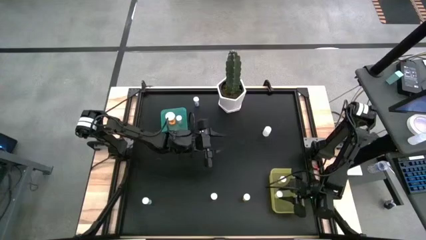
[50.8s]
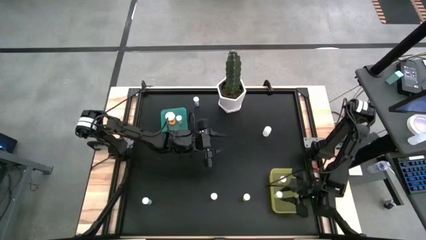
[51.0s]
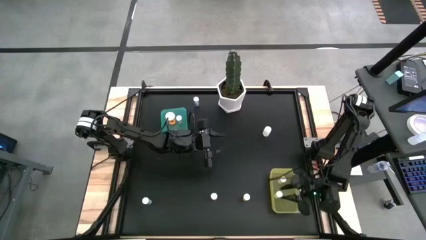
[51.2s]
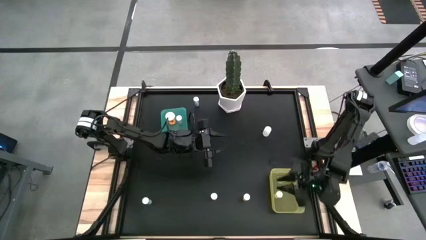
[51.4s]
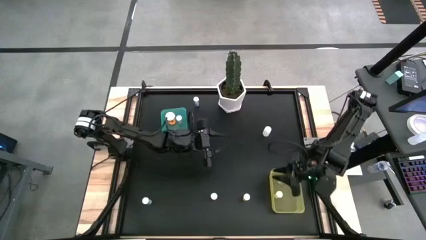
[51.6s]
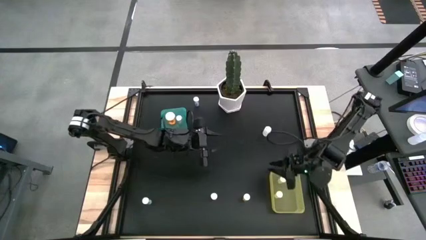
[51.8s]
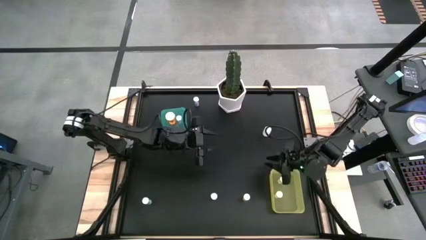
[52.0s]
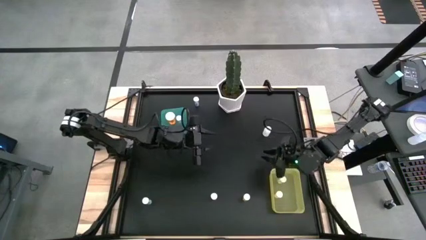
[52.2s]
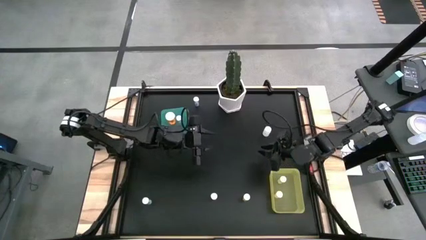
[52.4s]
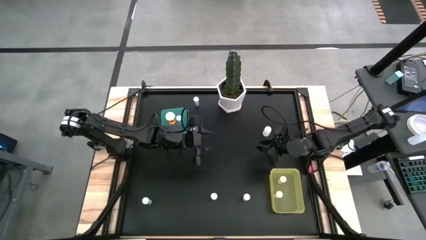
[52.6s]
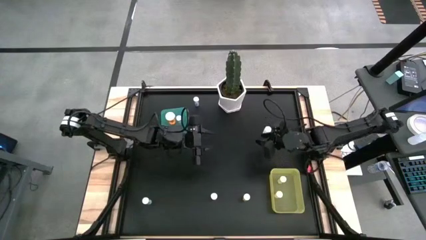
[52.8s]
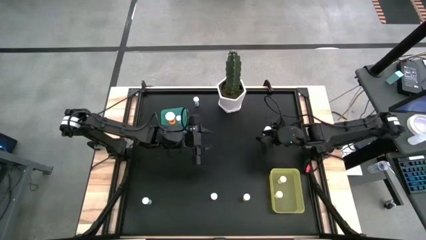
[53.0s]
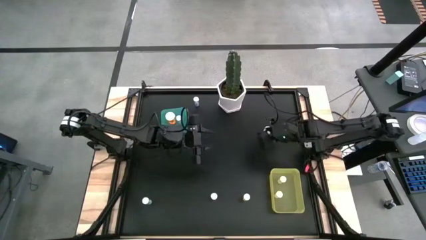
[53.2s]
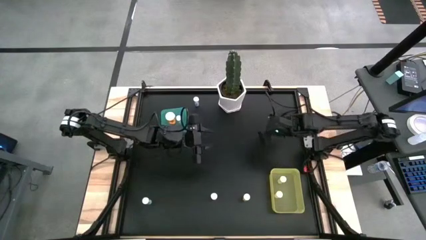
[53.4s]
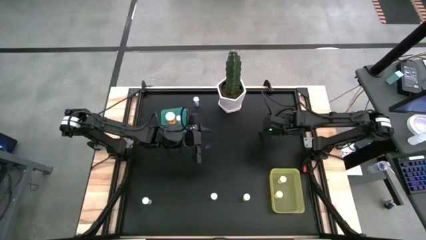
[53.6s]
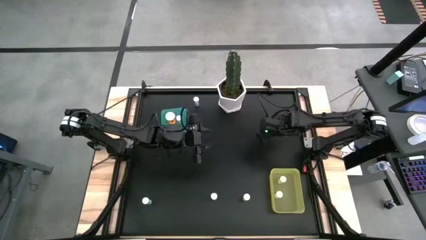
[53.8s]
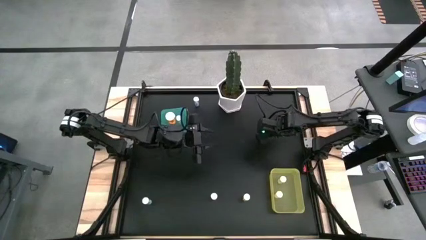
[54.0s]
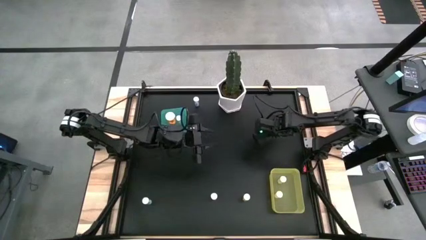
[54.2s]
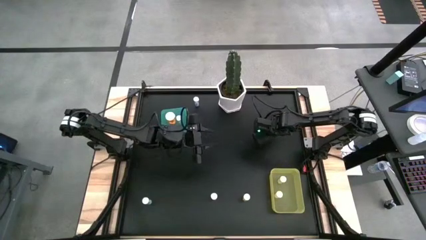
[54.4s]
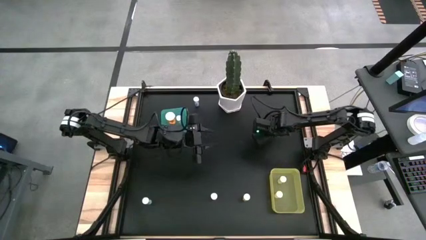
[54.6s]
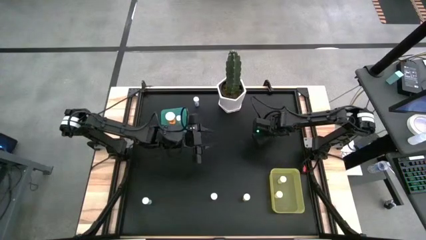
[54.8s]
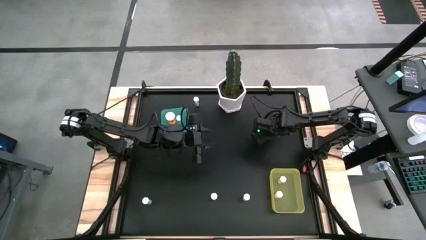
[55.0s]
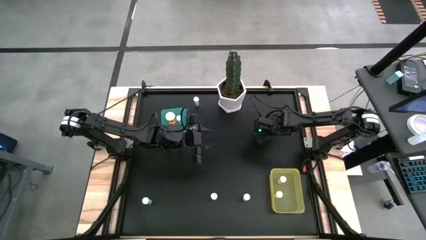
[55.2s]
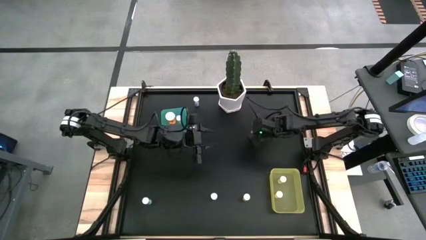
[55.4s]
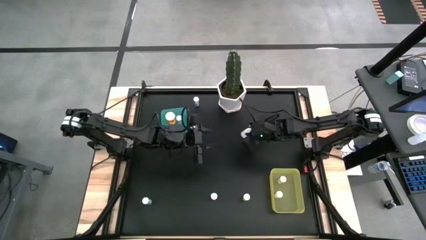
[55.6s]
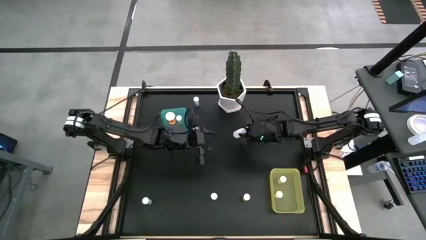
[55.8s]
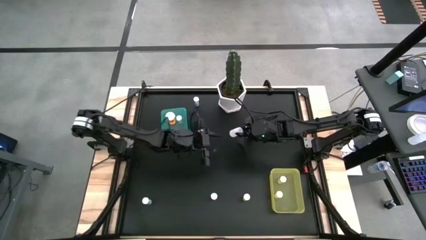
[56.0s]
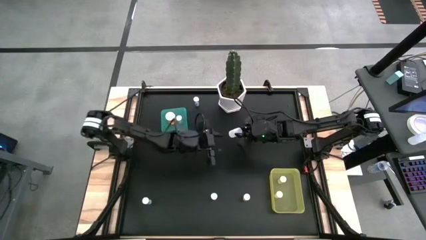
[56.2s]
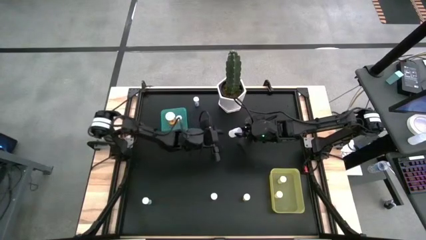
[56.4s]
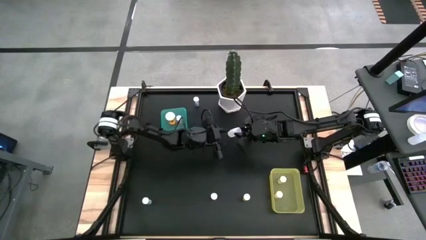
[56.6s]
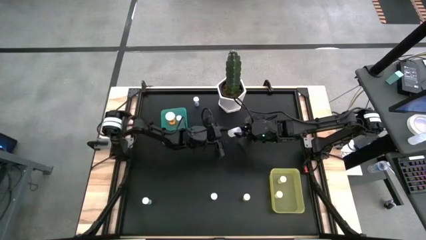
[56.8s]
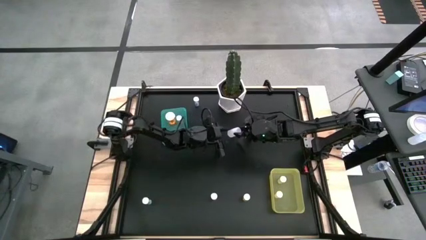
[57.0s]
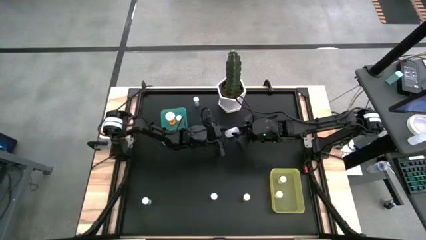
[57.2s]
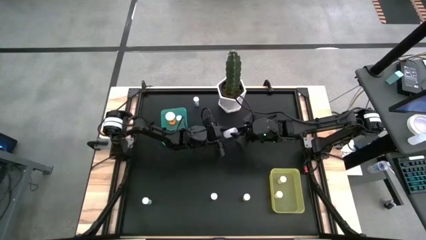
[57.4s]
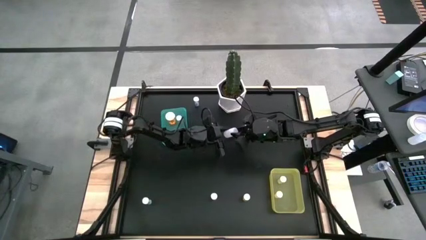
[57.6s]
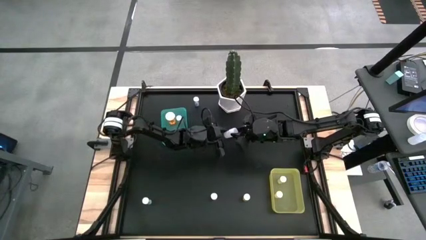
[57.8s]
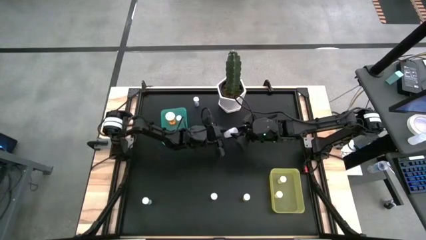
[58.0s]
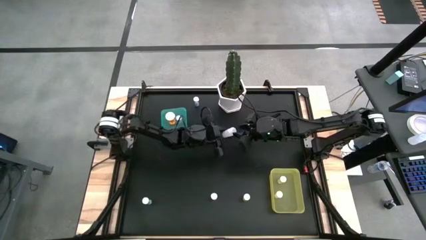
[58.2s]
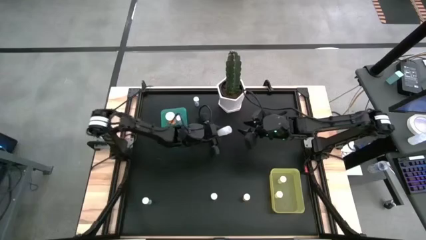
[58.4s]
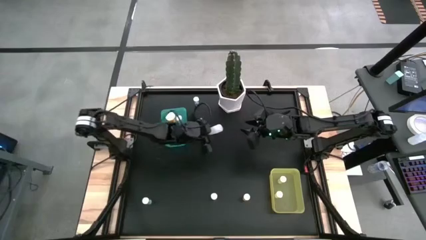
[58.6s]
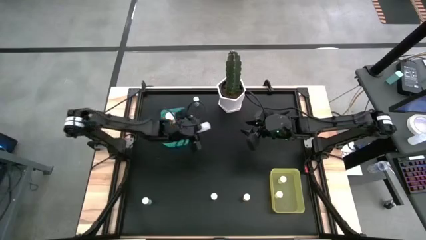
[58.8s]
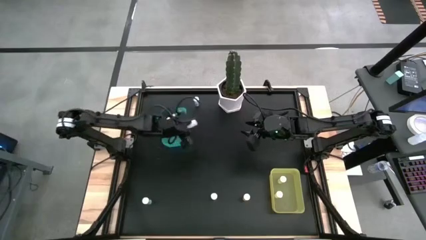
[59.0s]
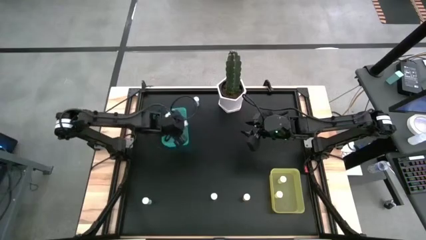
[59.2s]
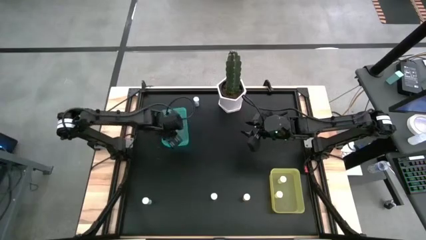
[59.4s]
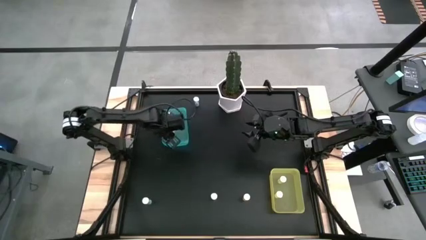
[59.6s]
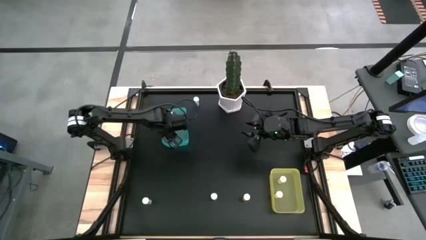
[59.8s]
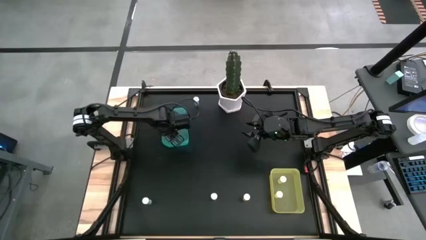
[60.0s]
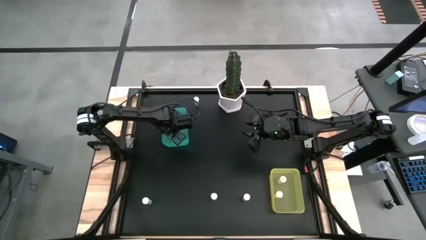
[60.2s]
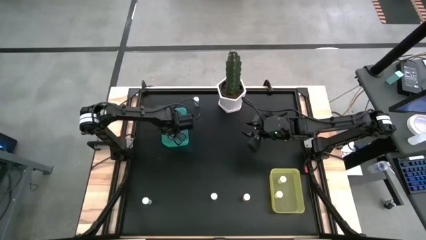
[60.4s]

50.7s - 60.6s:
Task: Pick and place medicine bottles into bin by pill shape (circle, oval)
Put the white capsule bottle into the blue bin
